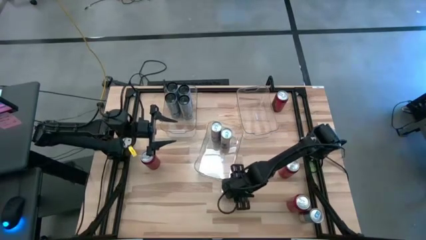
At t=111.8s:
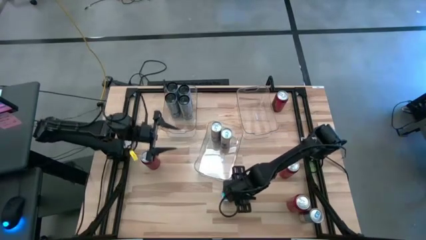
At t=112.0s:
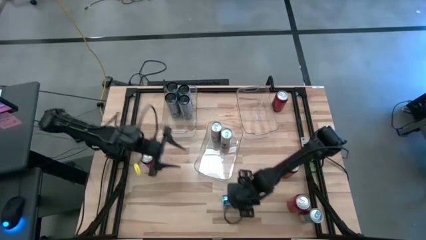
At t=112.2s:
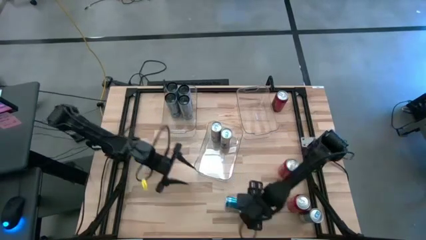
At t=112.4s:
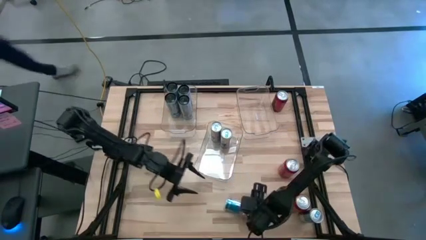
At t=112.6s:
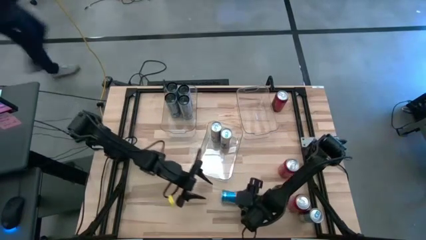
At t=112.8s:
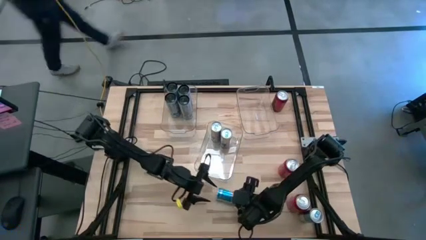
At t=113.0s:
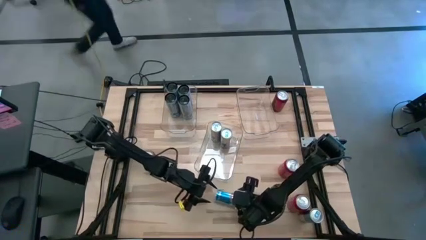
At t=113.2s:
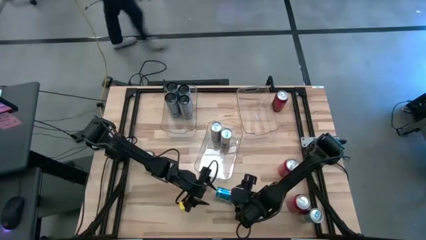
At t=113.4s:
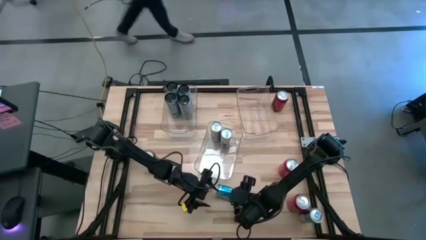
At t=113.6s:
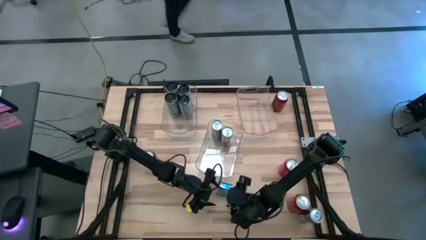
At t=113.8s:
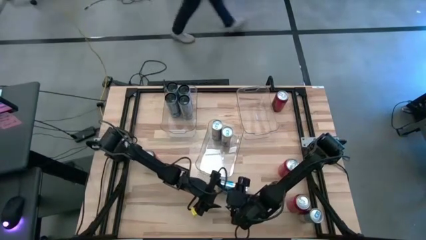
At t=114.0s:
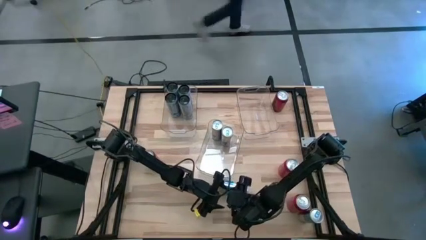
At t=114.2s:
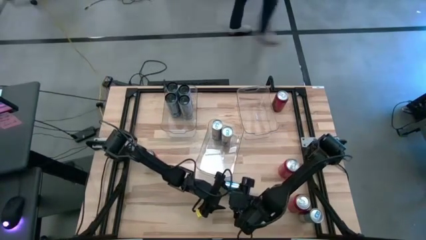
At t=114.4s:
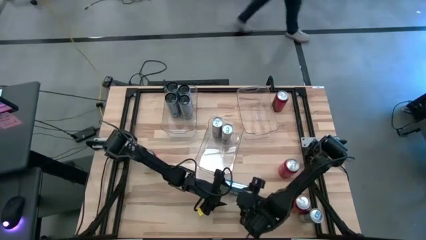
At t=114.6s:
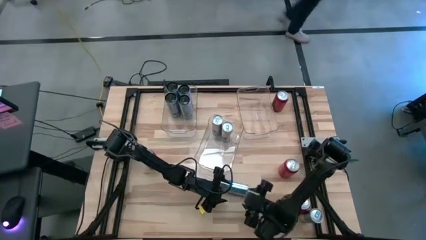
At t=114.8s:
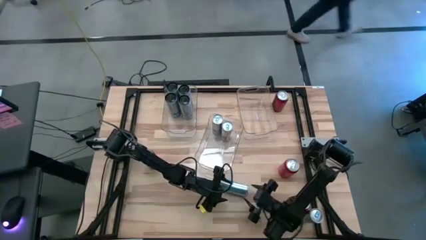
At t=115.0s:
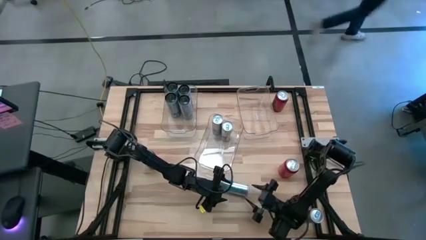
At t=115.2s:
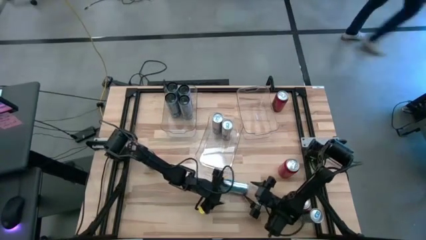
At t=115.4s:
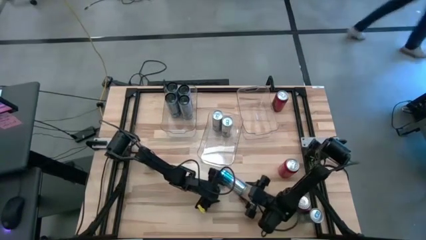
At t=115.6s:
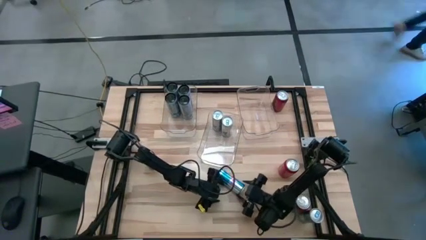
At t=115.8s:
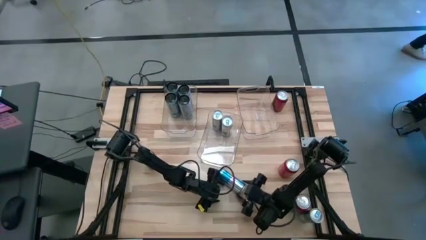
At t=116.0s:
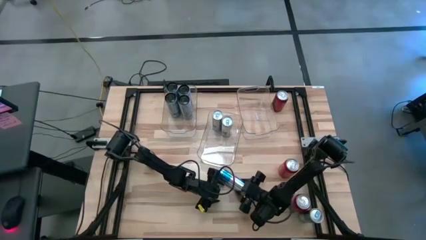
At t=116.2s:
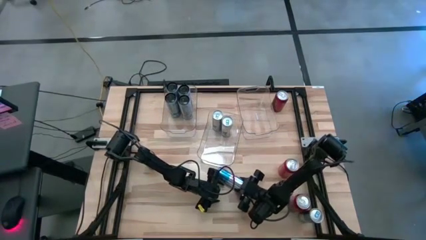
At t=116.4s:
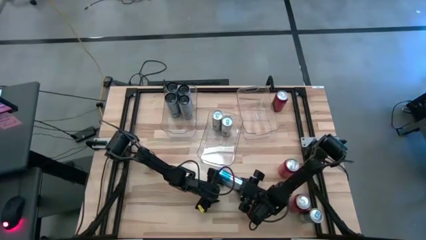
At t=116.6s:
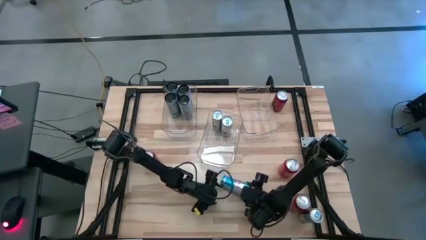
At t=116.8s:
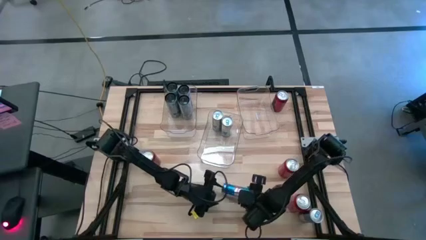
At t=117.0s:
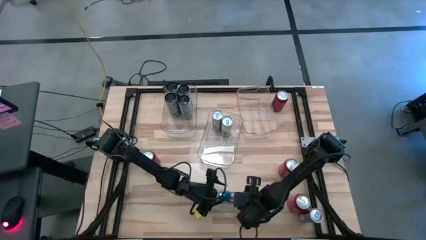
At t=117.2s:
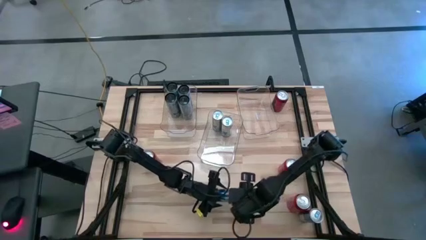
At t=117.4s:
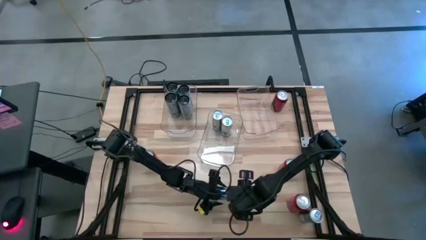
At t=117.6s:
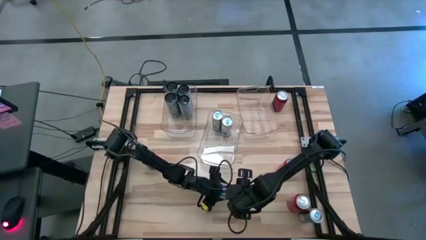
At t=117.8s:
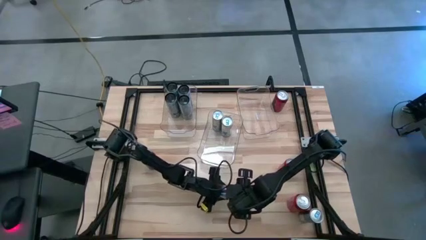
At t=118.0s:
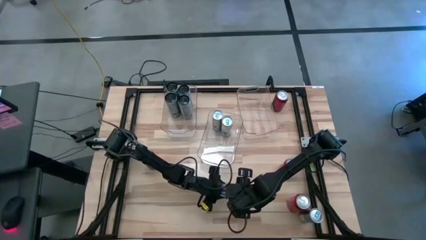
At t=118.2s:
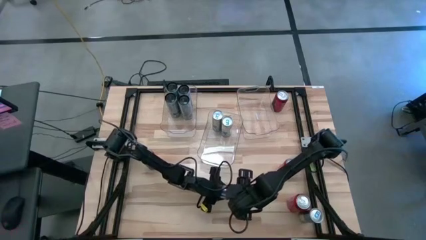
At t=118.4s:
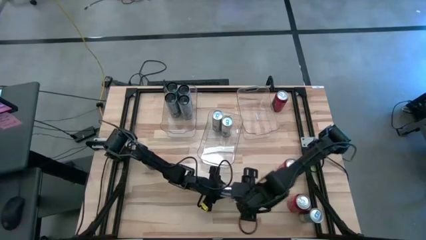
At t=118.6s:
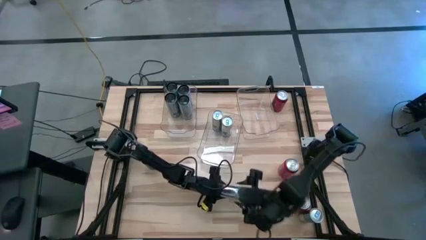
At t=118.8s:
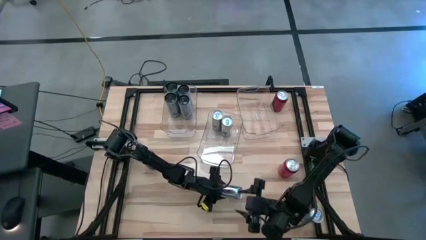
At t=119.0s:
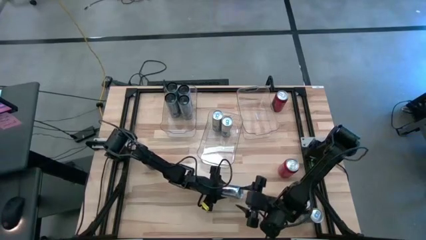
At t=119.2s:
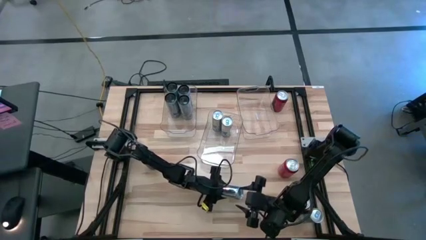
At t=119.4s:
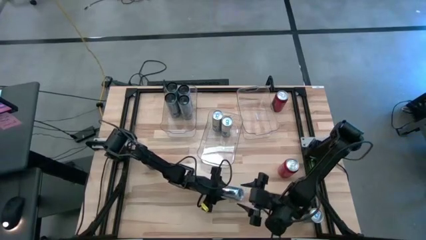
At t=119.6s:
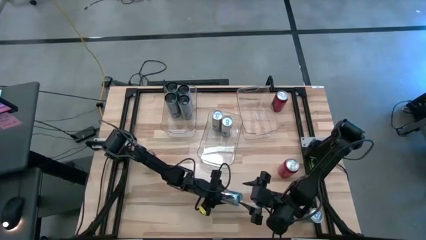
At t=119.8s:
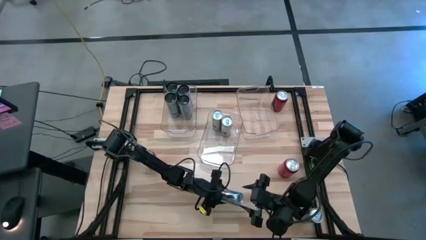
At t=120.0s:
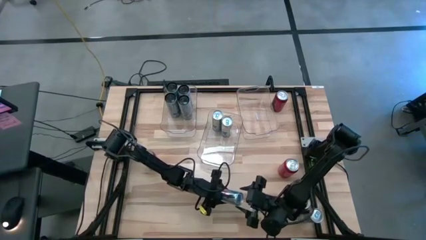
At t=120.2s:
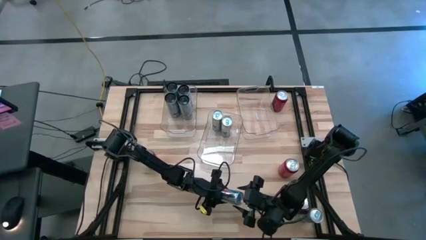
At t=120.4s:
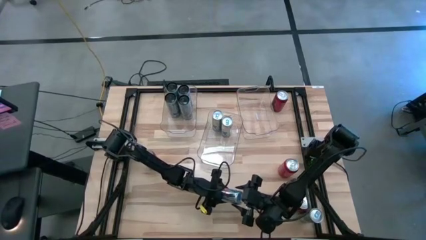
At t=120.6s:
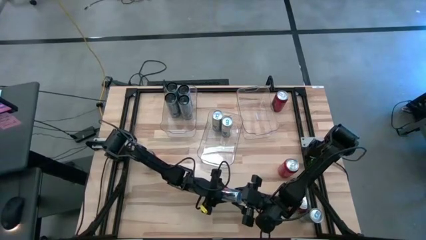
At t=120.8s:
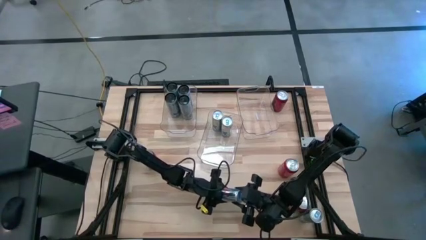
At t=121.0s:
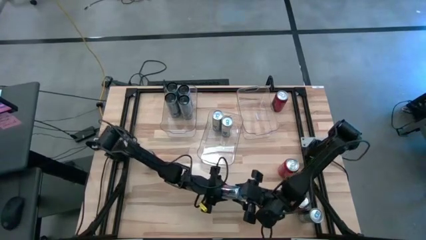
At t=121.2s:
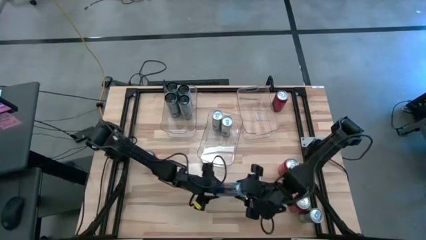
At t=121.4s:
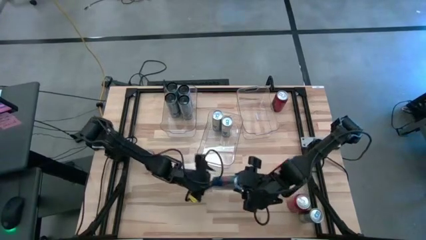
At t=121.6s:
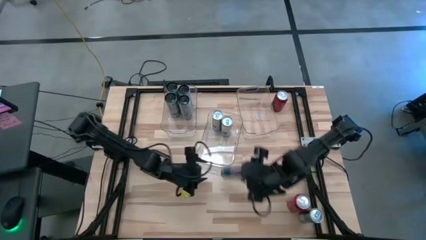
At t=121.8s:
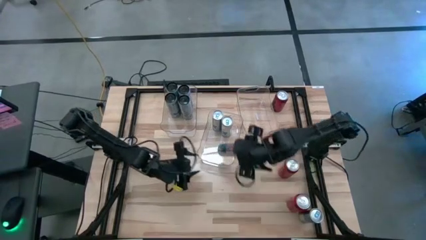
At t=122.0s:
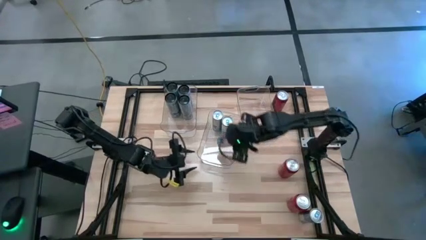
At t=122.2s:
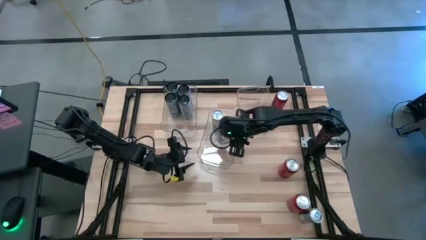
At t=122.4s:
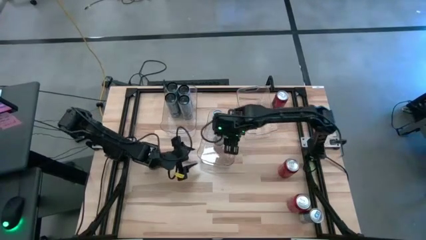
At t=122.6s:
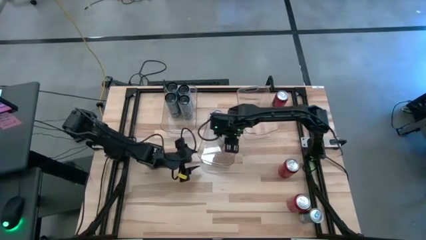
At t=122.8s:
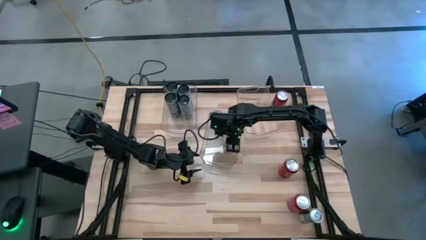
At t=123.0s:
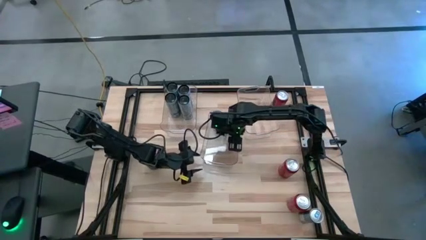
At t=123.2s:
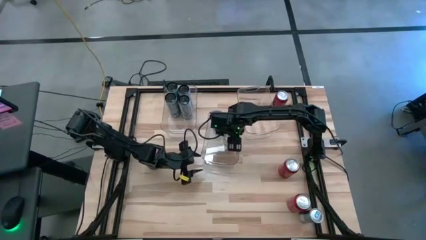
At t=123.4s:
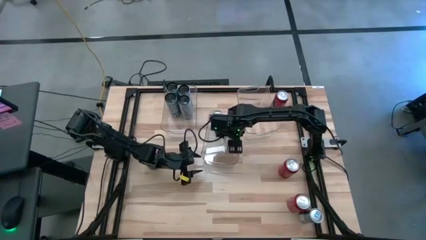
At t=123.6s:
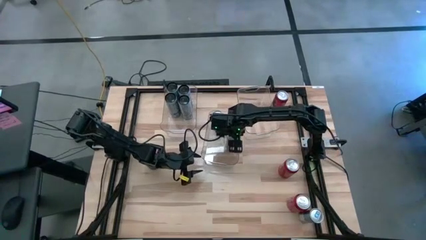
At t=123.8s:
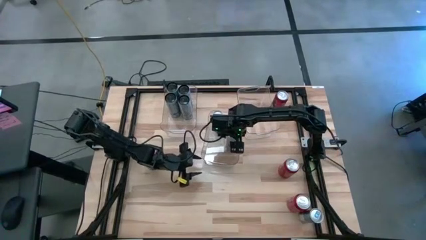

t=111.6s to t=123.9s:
Task: Sort soda cans
Put the blue soda can into the middle transparent bin

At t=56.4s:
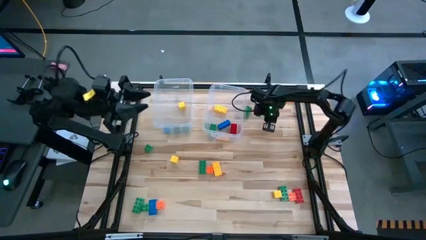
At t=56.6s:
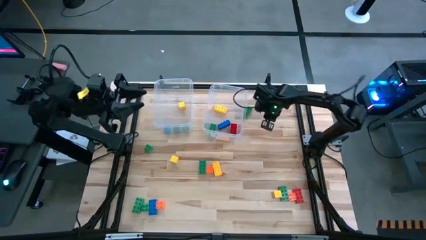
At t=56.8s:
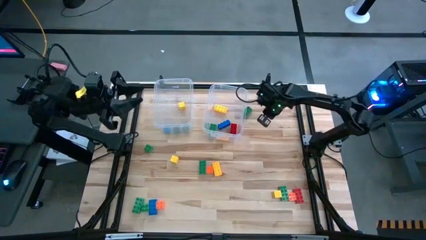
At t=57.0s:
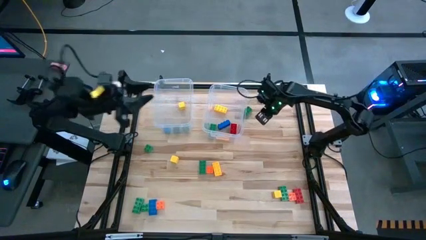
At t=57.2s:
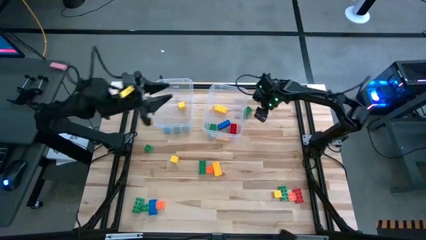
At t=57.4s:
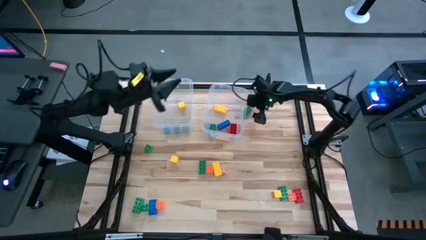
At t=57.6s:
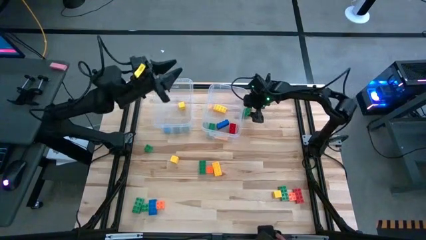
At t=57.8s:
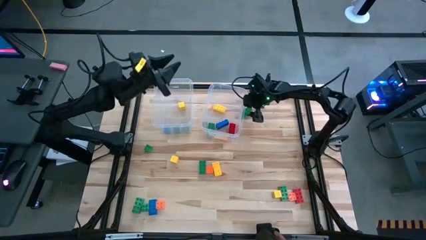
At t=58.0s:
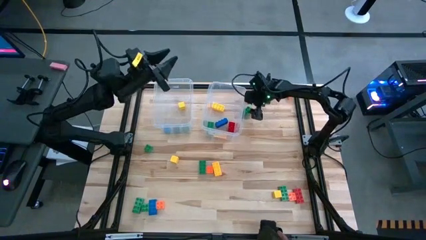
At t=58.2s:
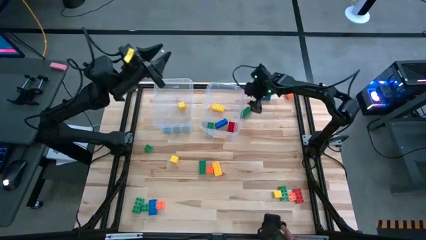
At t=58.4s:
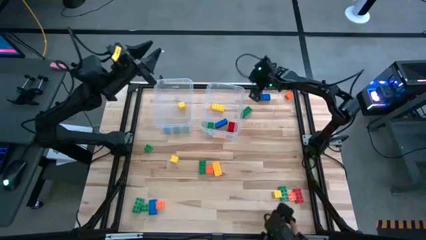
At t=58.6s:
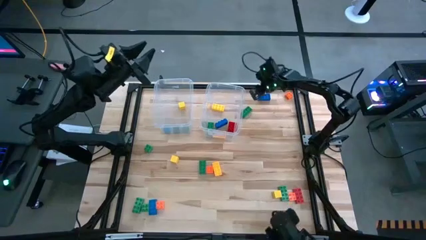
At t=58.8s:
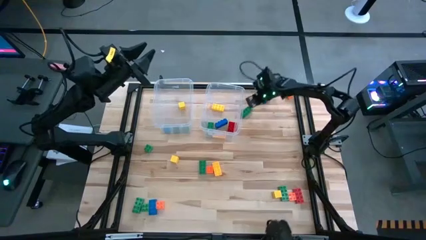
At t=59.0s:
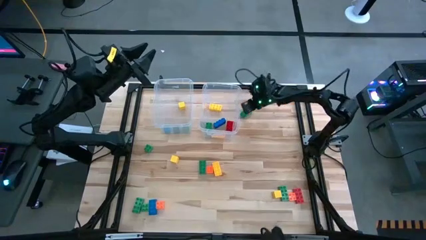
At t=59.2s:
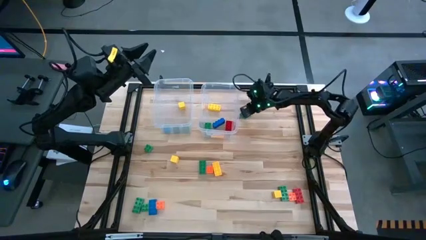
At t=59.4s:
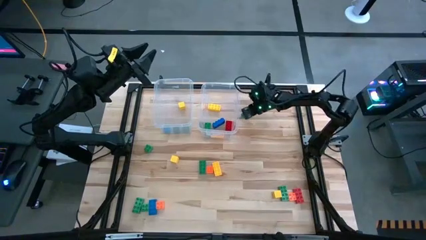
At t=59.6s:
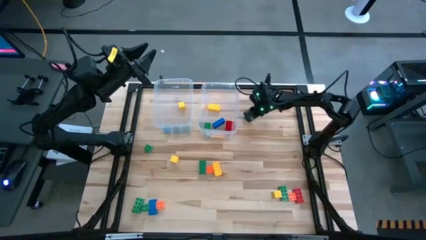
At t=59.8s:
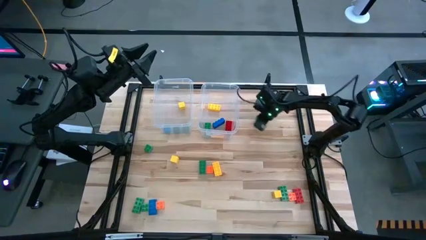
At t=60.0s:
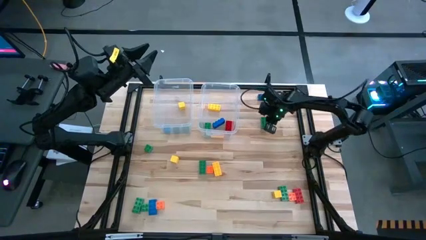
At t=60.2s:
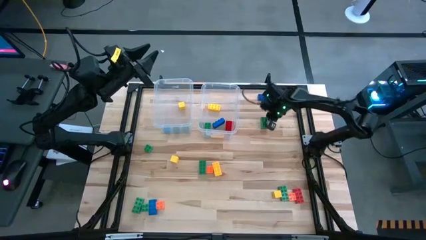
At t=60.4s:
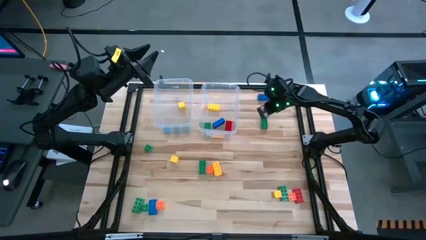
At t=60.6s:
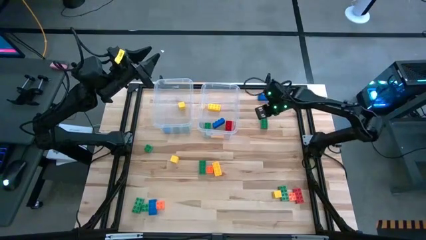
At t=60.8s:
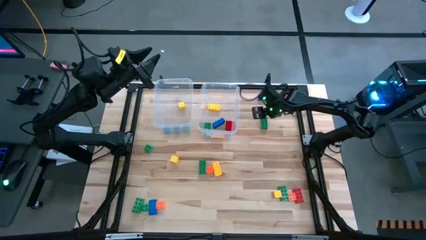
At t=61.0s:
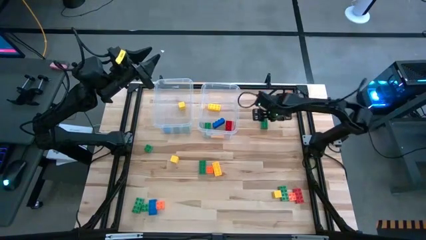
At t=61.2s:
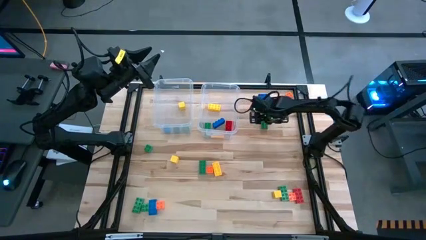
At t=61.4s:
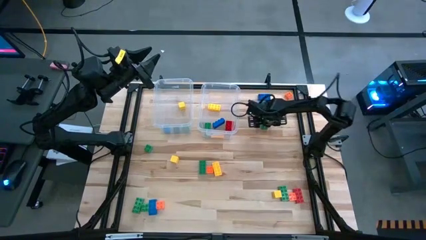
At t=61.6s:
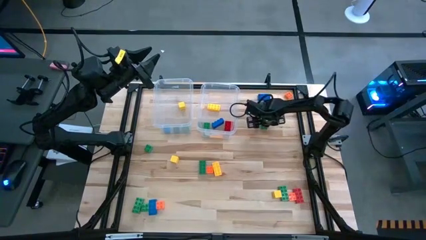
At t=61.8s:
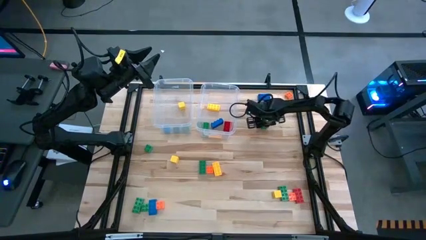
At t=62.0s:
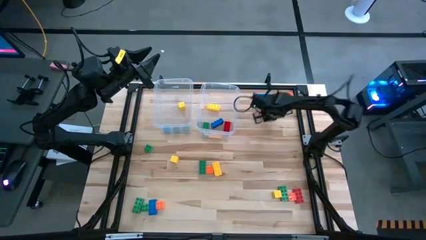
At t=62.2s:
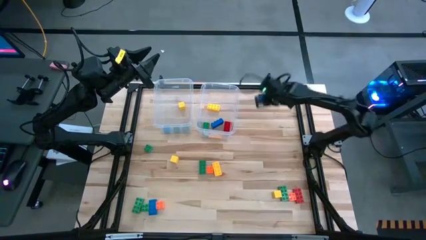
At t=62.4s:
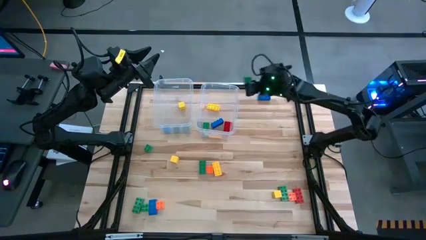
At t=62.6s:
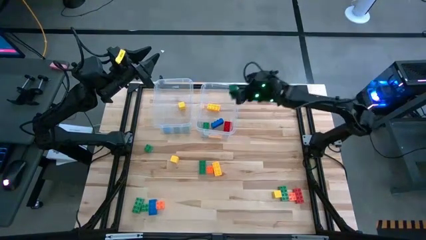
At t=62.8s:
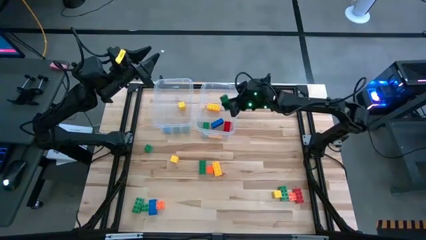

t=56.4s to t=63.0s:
Task: Sort blocks by size
Put the green big game piece into the right transparent bin
